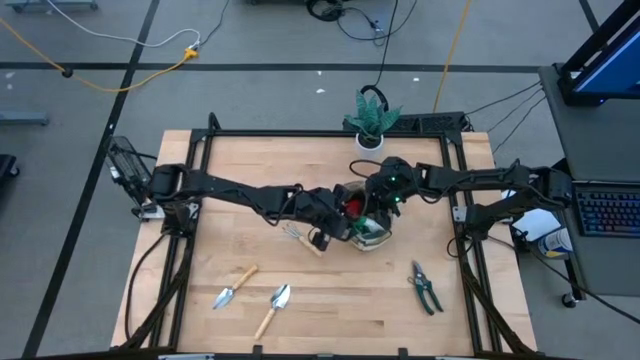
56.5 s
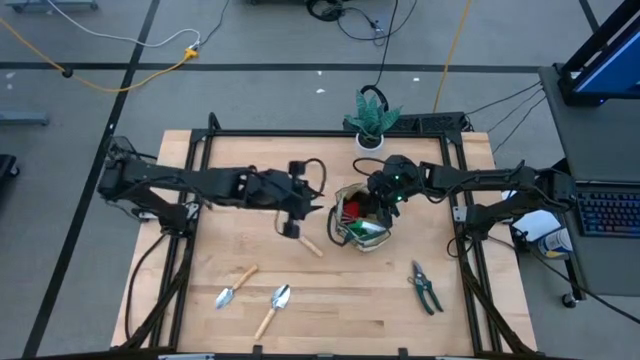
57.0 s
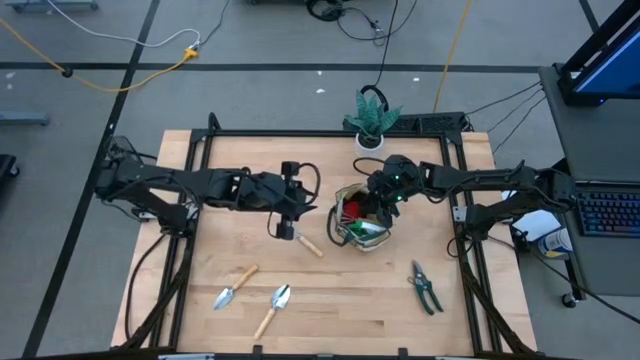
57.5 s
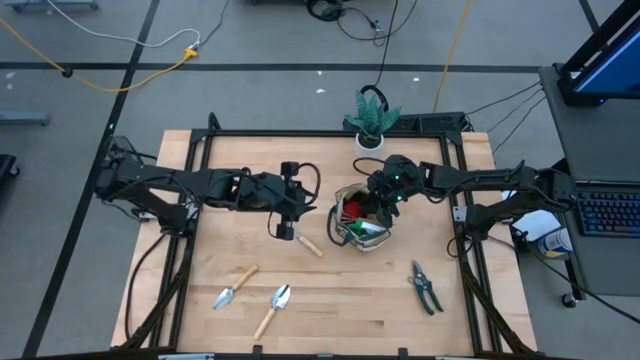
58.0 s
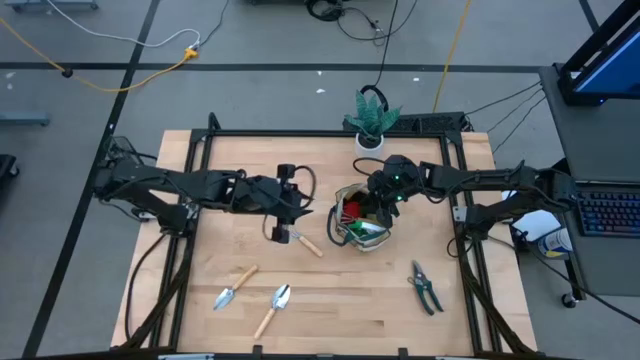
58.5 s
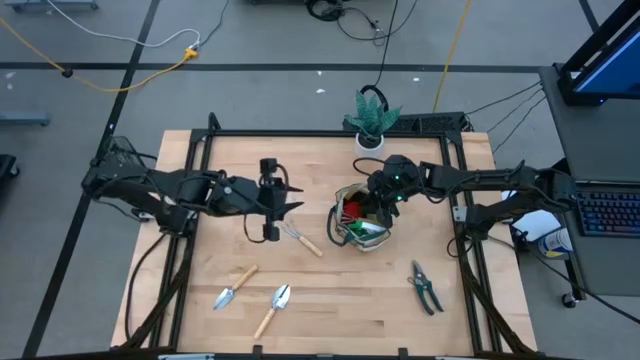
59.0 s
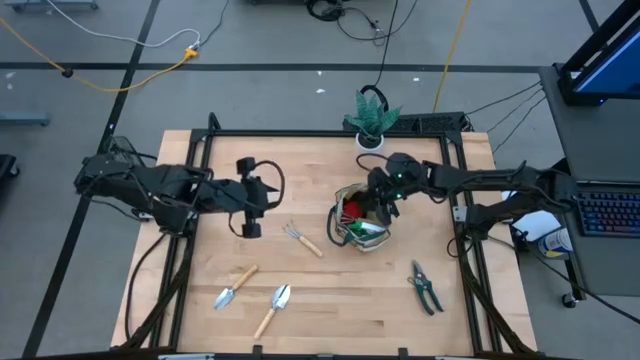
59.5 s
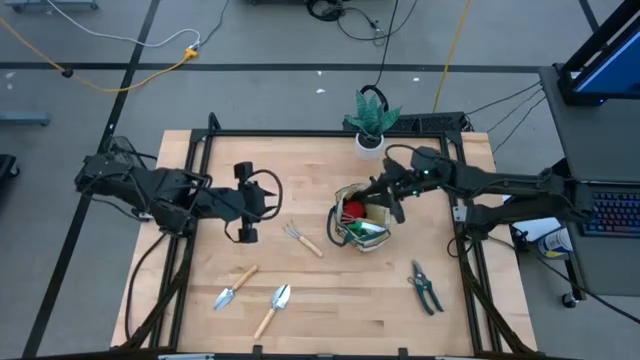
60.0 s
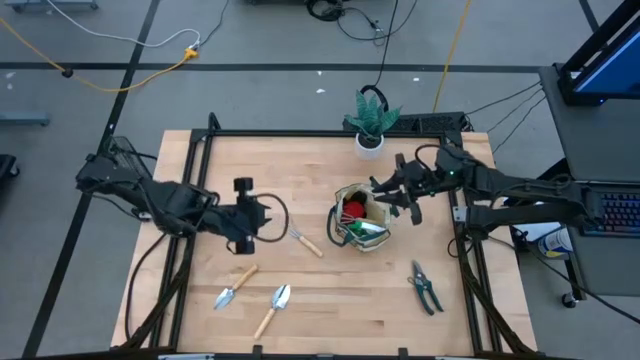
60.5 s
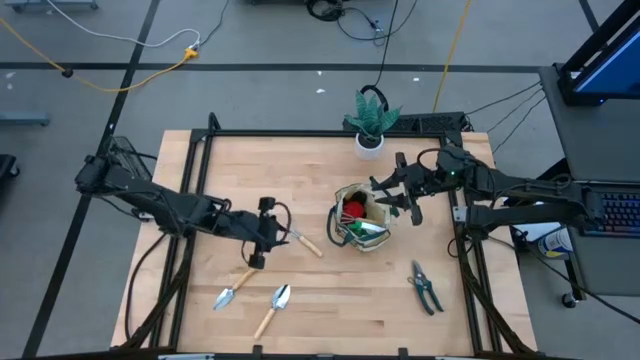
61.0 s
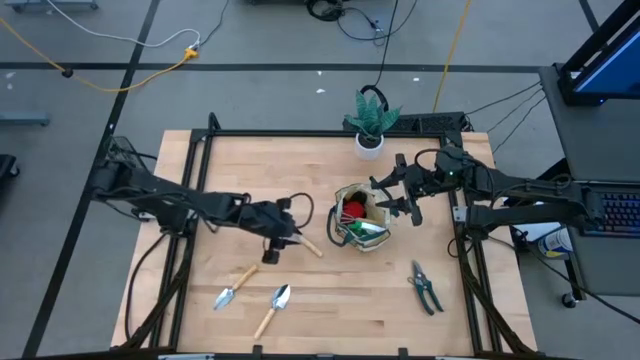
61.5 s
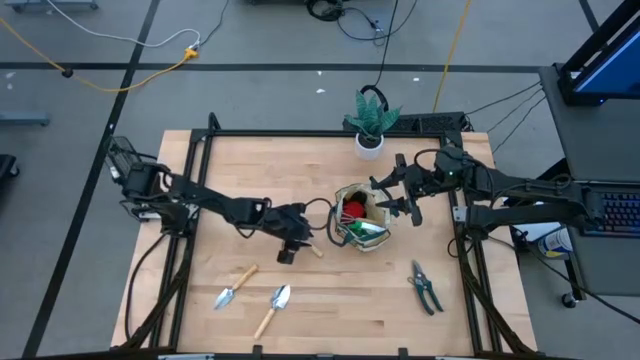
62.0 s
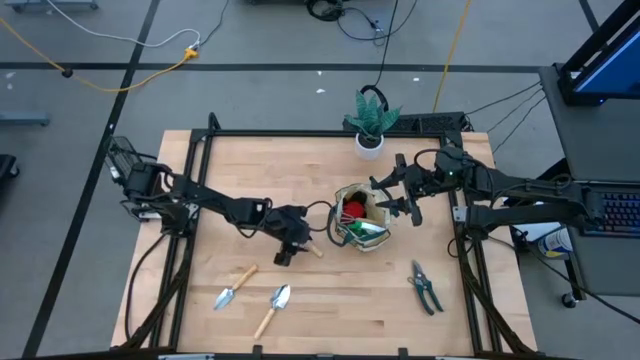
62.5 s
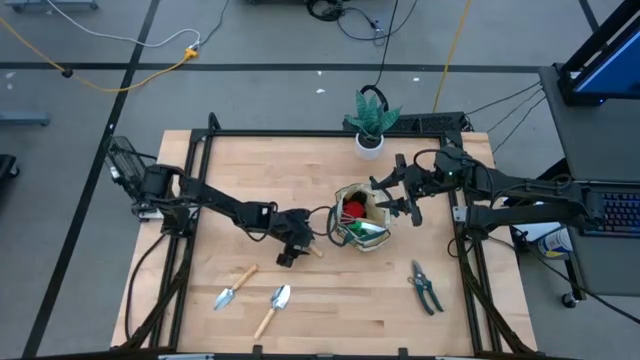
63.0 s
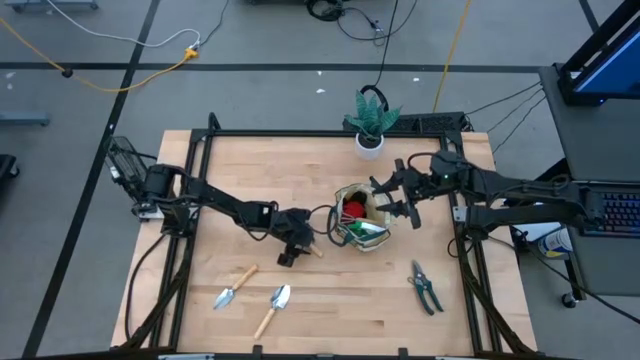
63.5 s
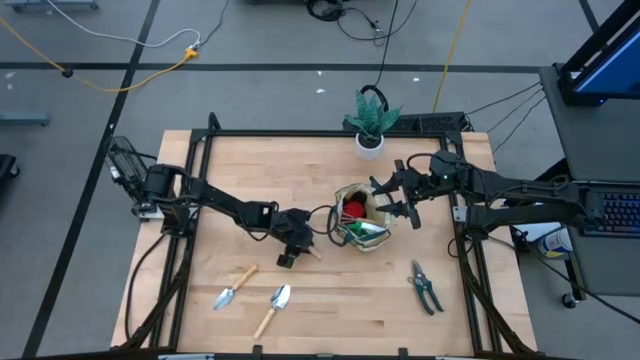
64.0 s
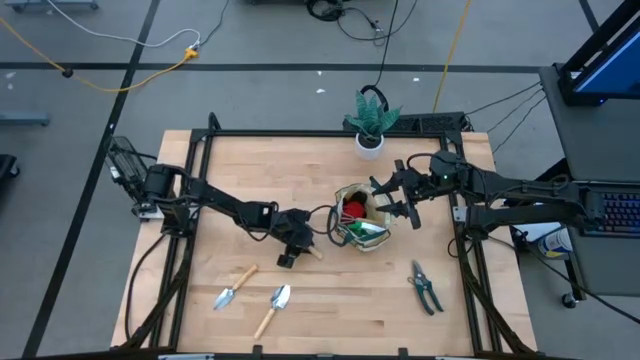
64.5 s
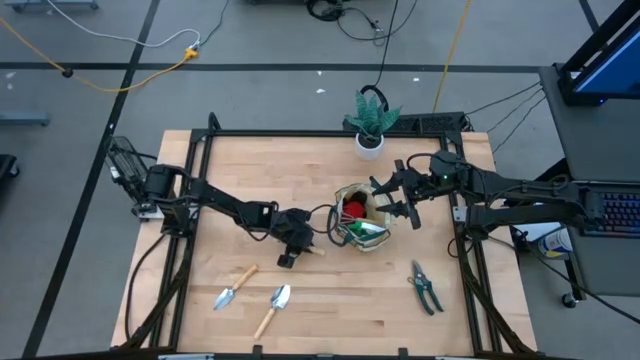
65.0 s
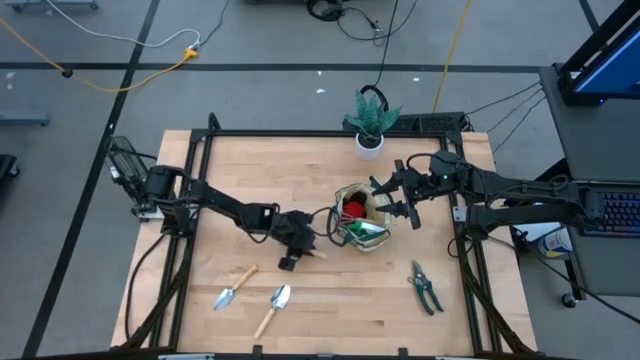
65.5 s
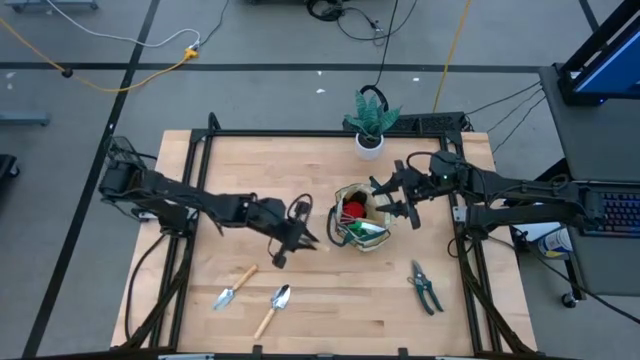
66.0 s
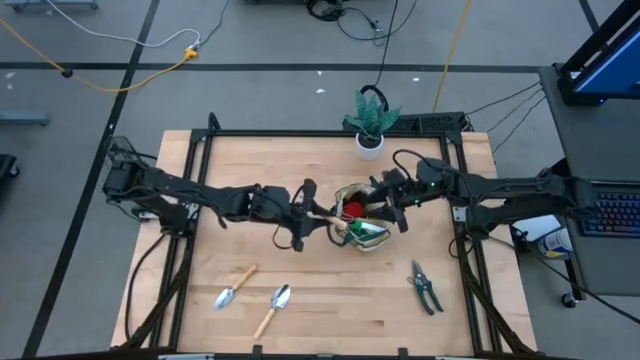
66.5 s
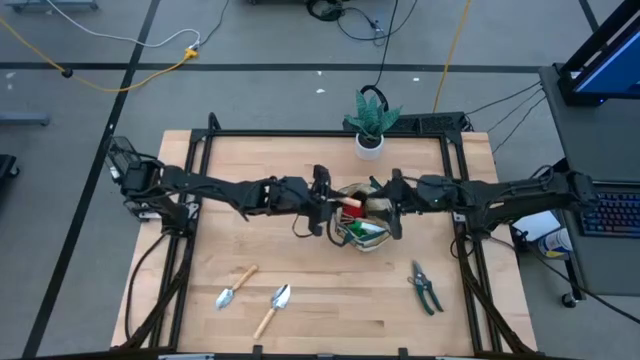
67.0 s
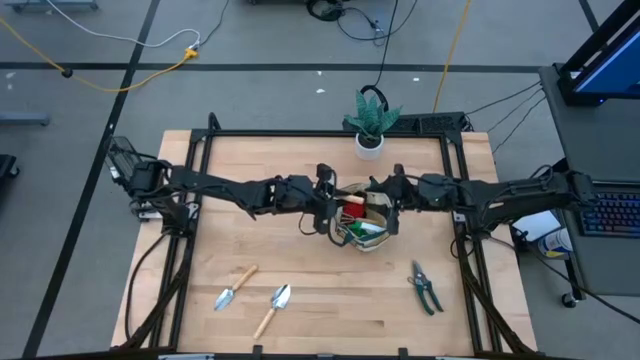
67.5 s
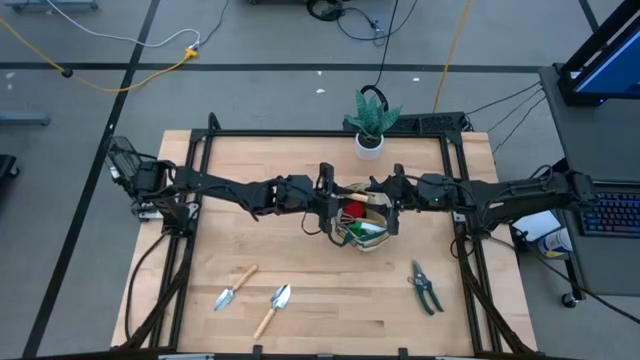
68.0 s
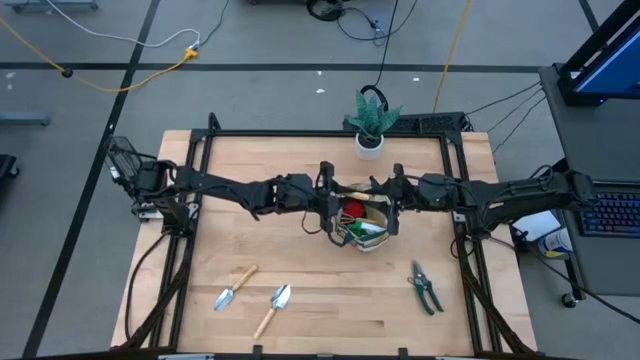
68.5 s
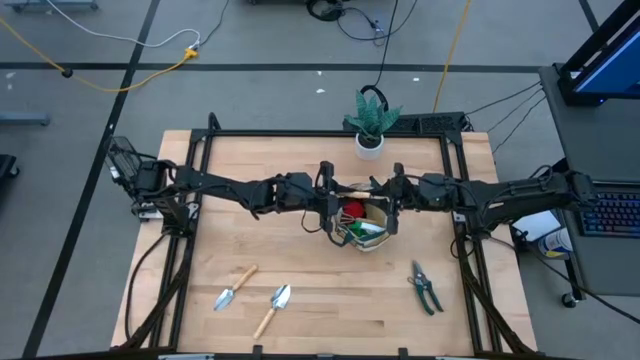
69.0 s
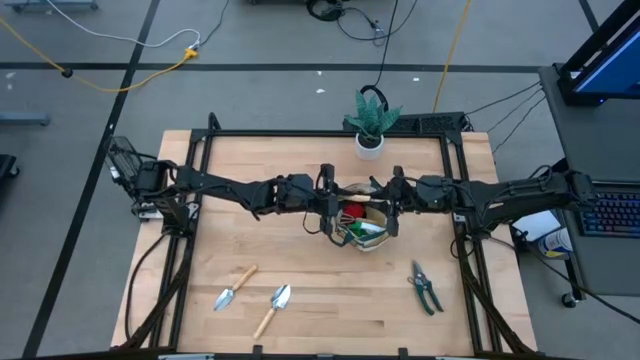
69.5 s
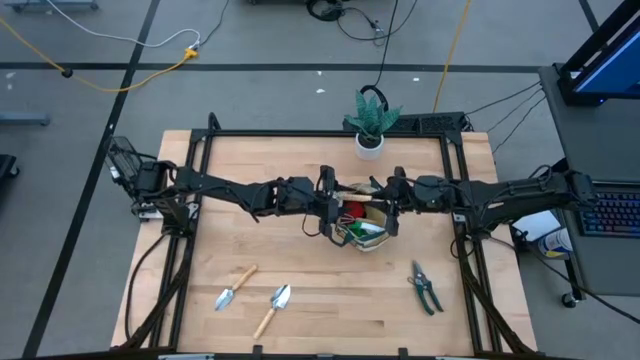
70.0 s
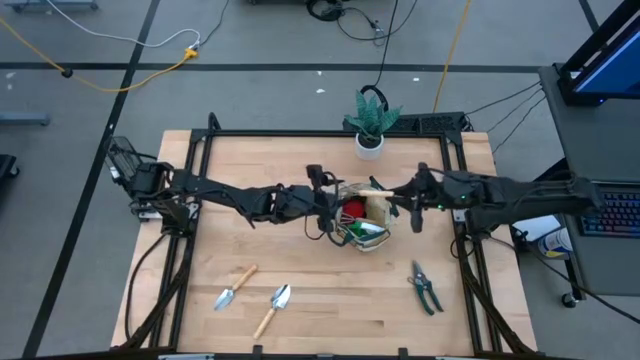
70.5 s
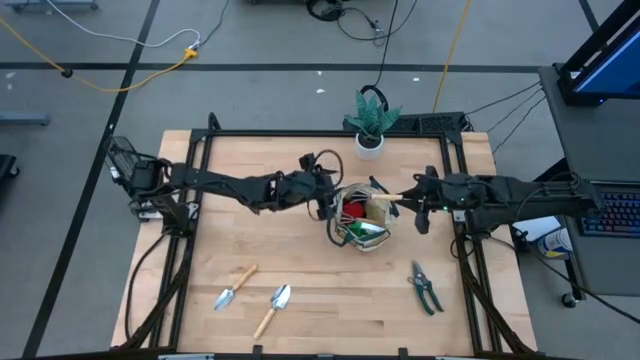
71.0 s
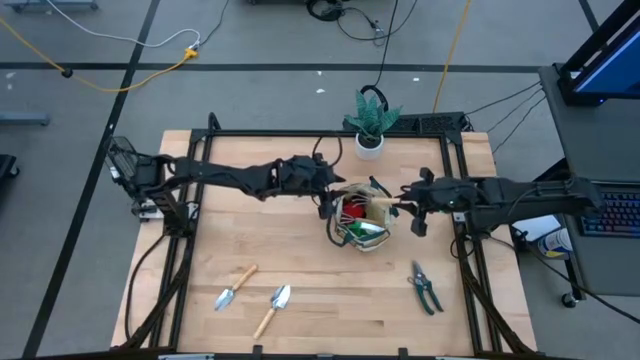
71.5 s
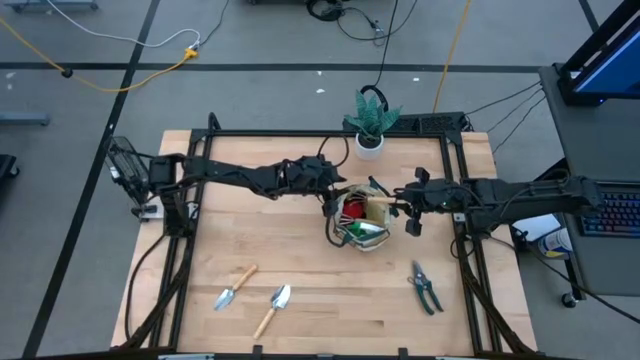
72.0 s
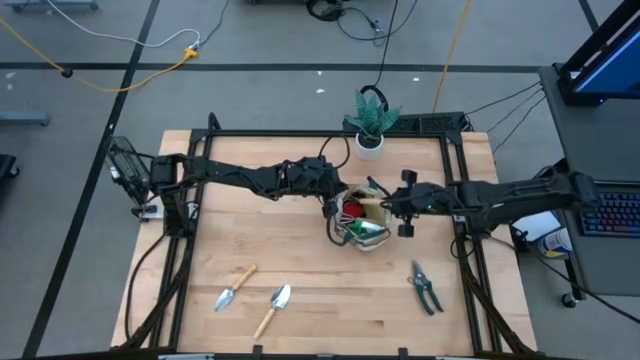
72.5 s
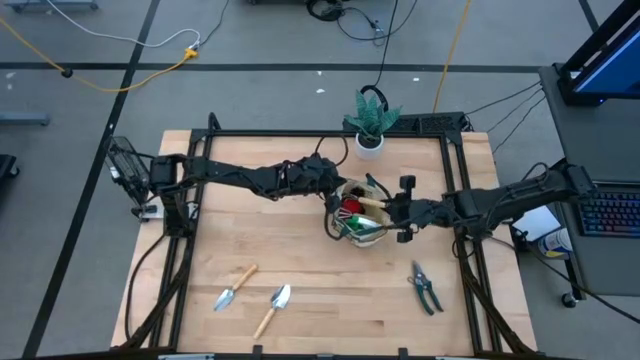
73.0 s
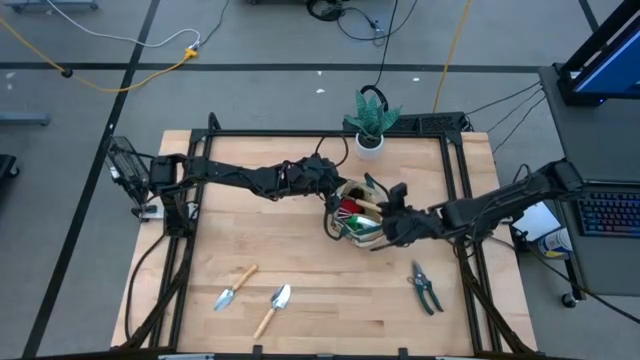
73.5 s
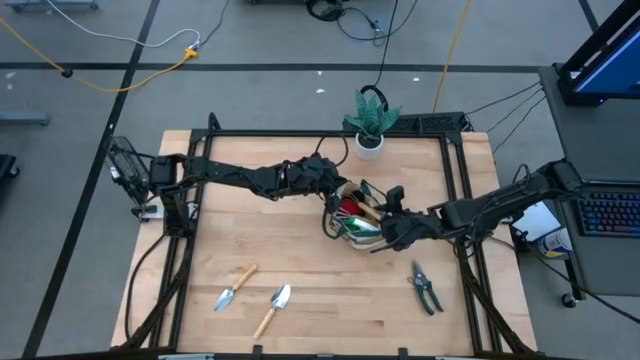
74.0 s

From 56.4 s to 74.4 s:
Task: Pick & Place Garden tools in Gardening bag
Put the brown hand rake into the gardening bag

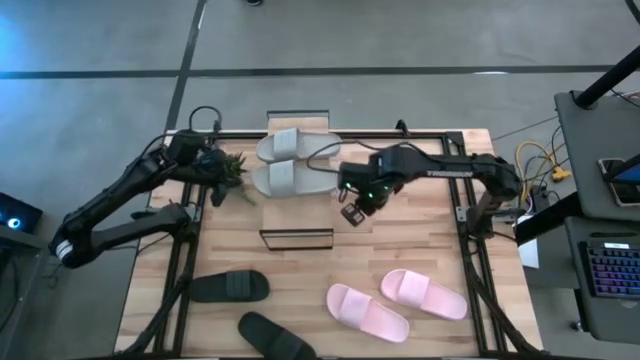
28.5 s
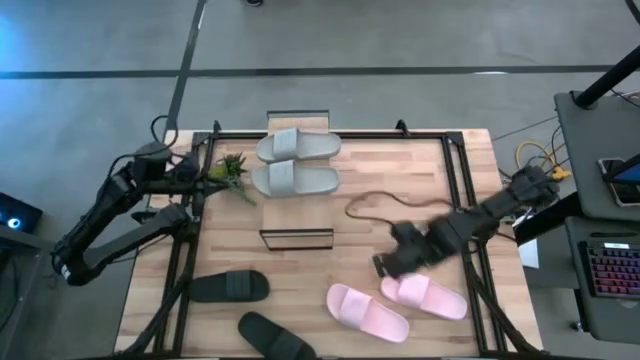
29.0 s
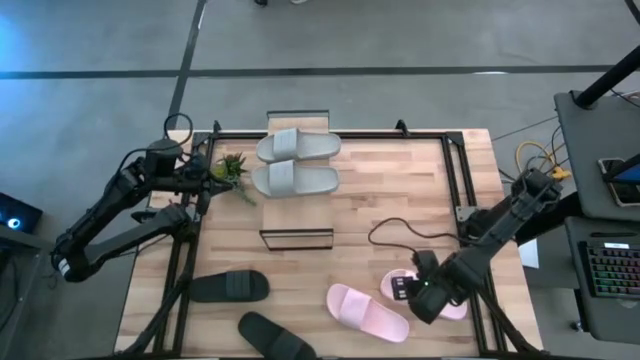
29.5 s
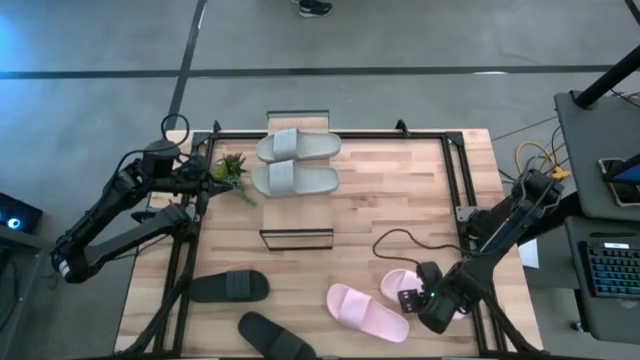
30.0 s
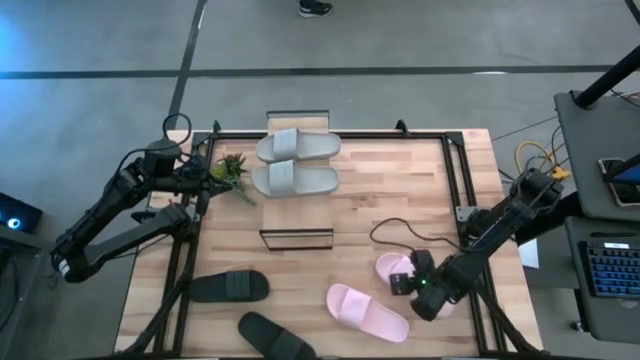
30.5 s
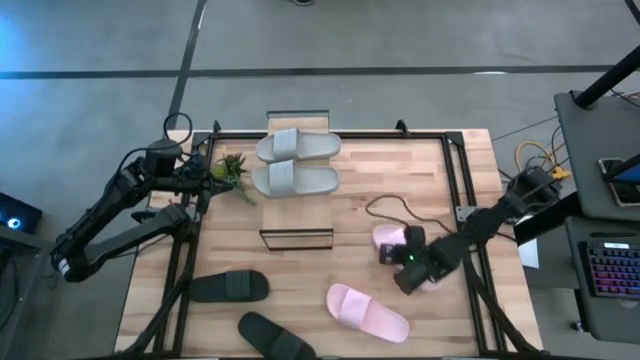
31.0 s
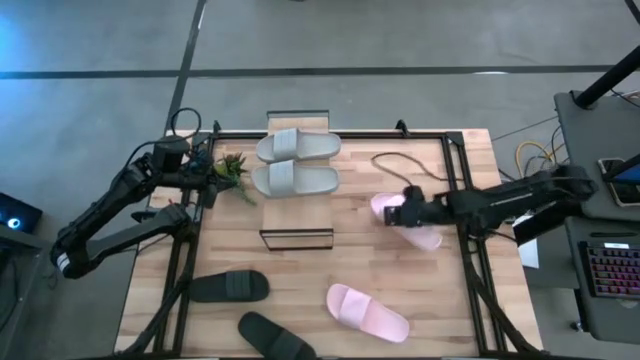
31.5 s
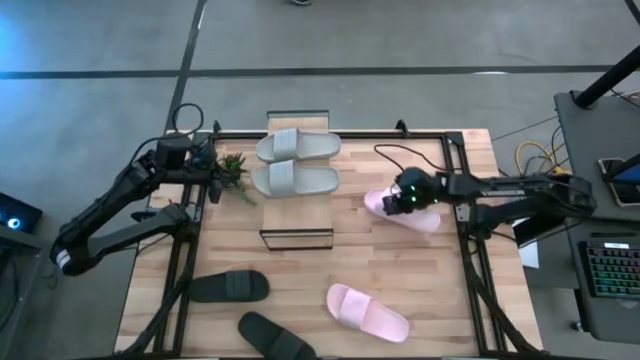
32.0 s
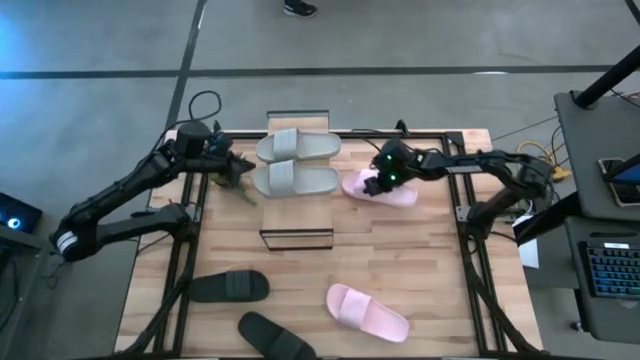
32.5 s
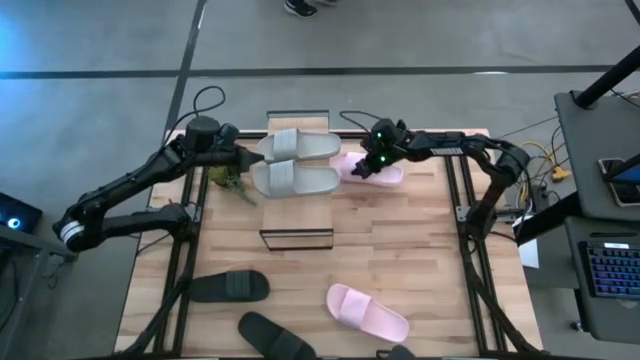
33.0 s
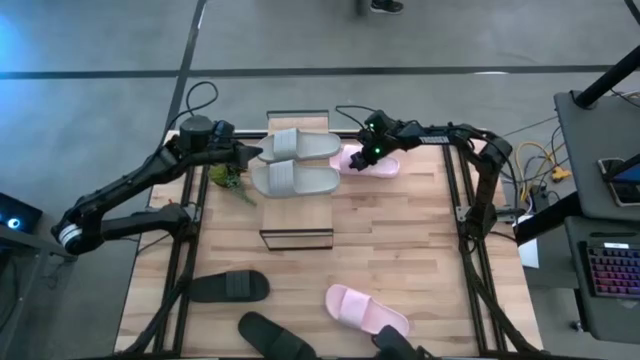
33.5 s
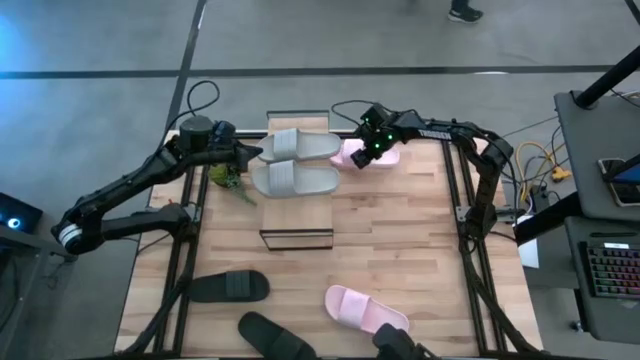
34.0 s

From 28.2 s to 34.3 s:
Task: Pick and place slides into the shelf
Move the top pink slide to the upper middle of the table
